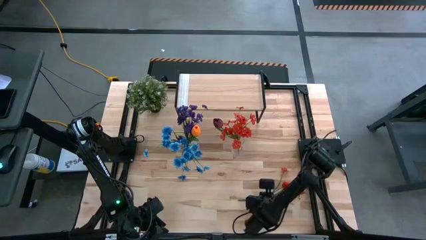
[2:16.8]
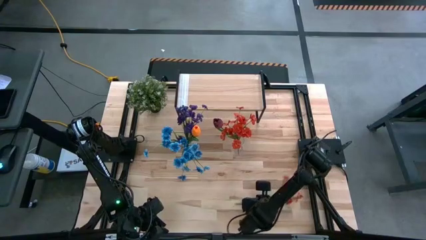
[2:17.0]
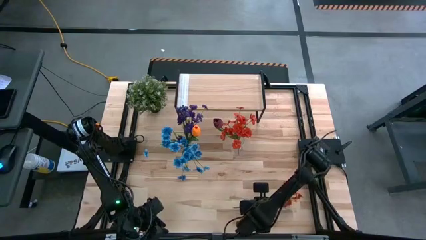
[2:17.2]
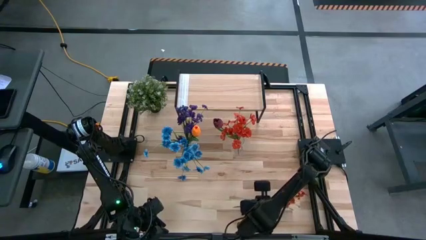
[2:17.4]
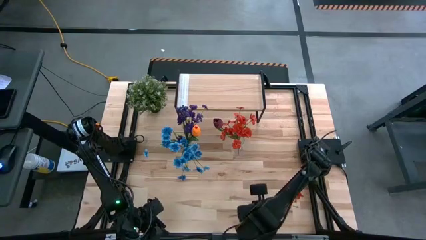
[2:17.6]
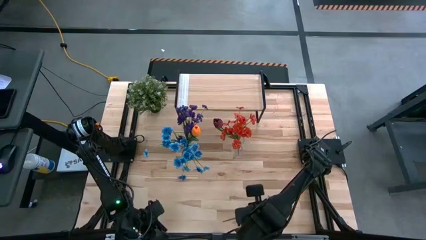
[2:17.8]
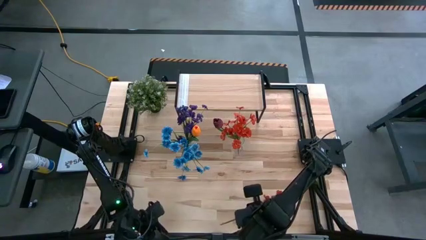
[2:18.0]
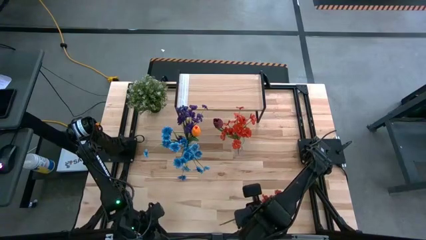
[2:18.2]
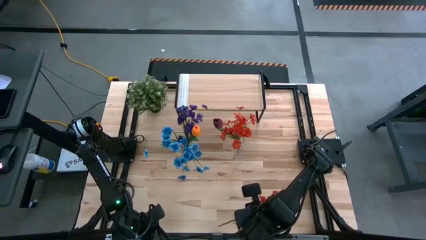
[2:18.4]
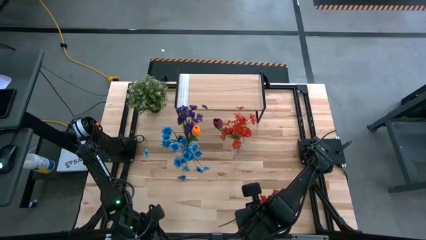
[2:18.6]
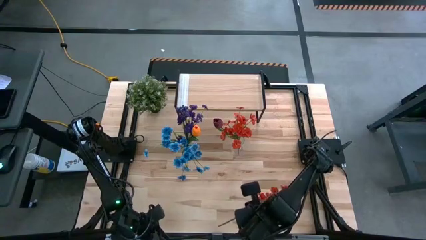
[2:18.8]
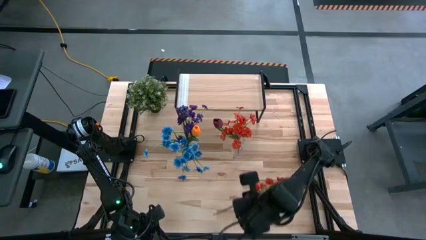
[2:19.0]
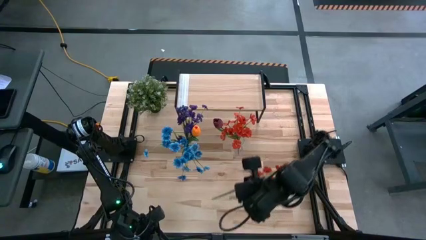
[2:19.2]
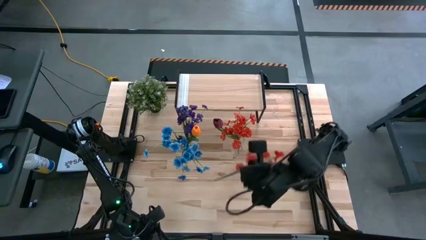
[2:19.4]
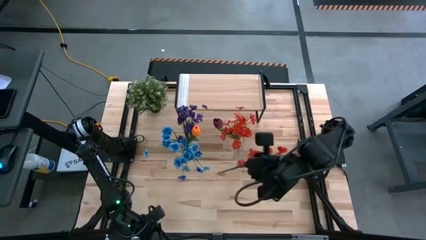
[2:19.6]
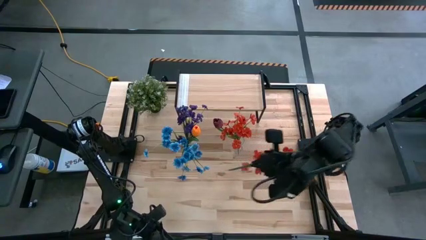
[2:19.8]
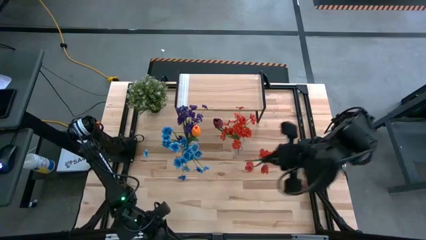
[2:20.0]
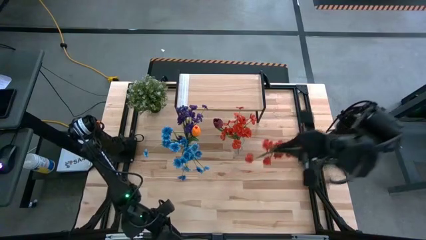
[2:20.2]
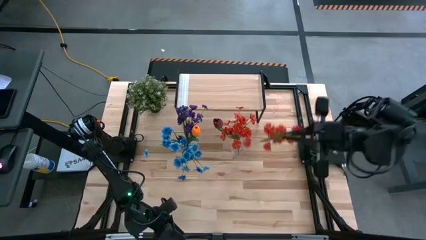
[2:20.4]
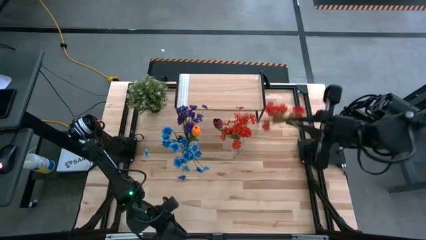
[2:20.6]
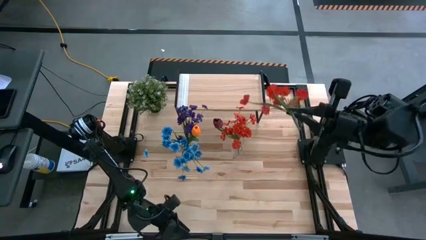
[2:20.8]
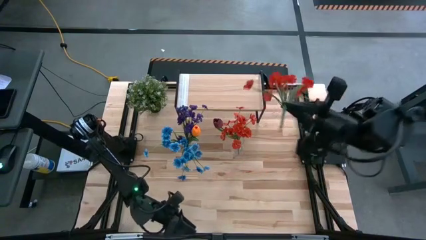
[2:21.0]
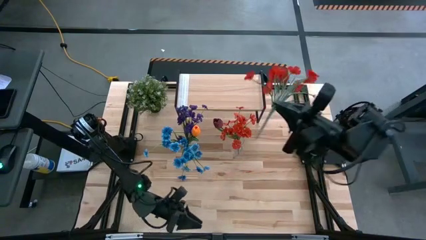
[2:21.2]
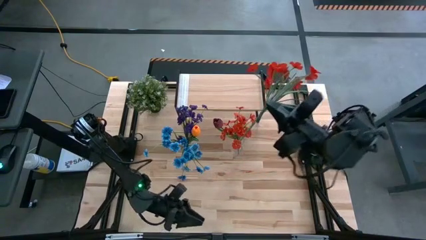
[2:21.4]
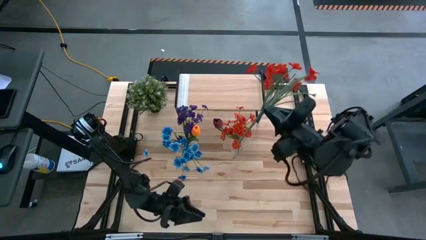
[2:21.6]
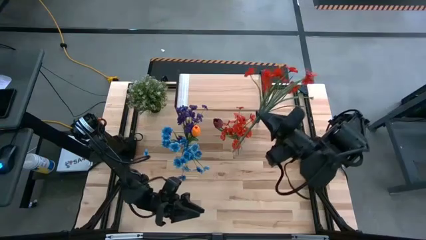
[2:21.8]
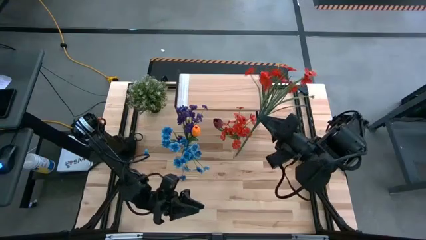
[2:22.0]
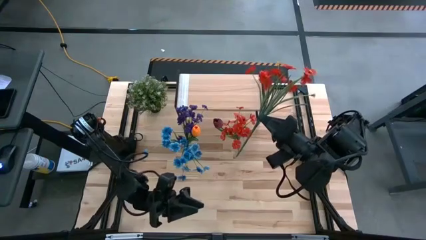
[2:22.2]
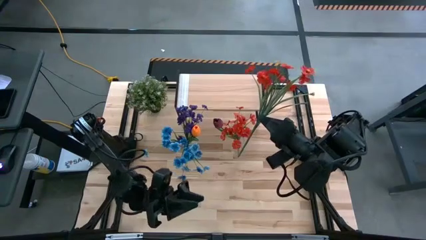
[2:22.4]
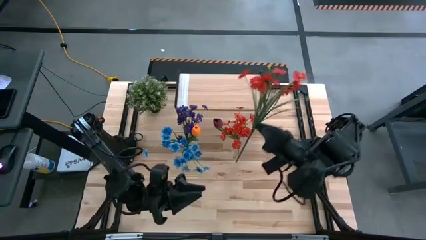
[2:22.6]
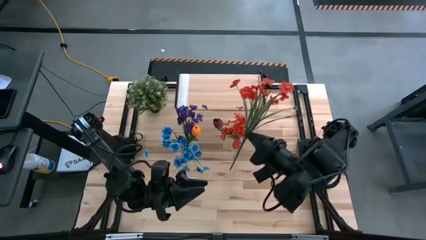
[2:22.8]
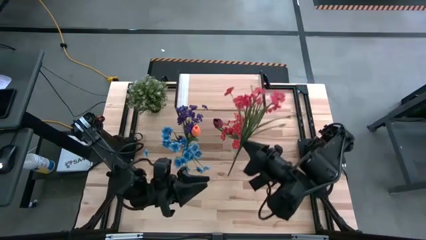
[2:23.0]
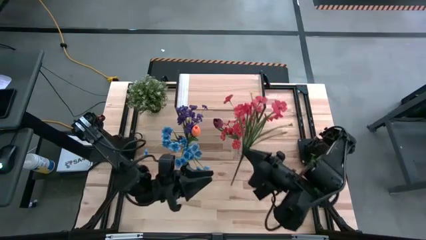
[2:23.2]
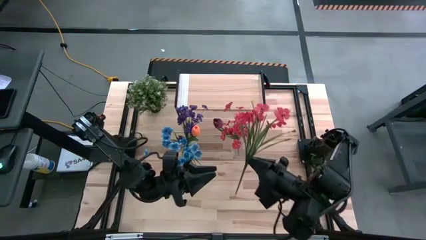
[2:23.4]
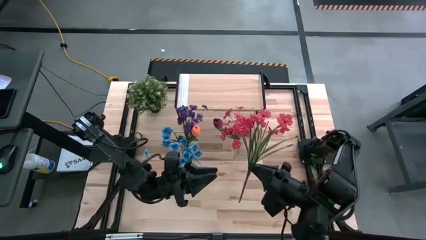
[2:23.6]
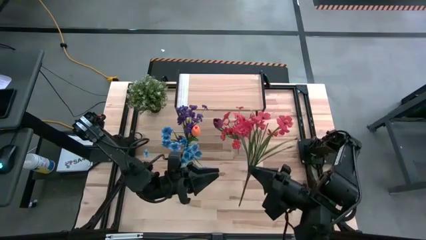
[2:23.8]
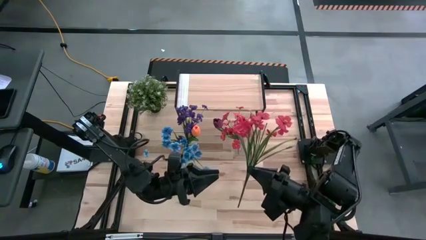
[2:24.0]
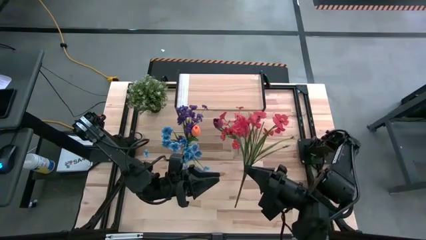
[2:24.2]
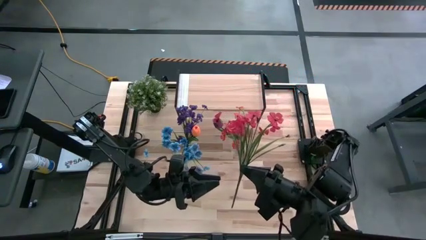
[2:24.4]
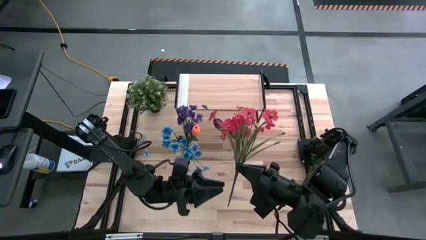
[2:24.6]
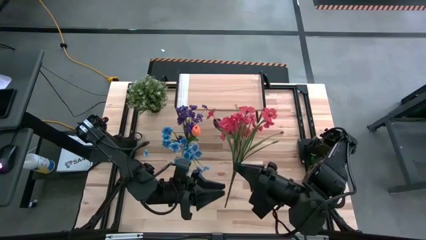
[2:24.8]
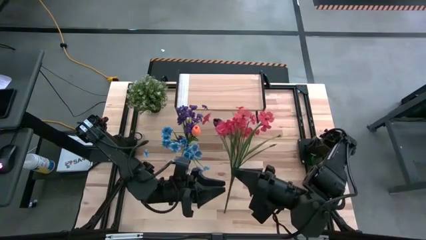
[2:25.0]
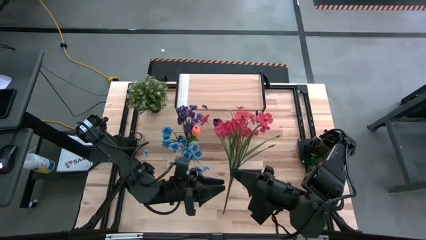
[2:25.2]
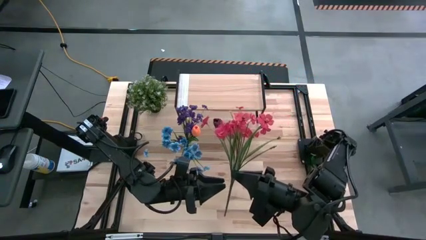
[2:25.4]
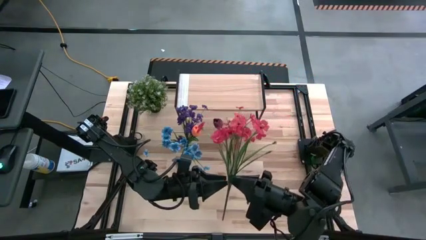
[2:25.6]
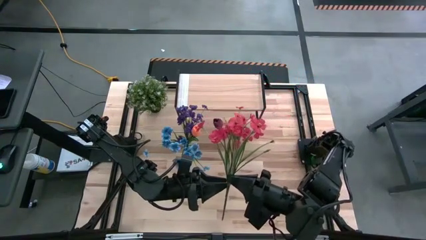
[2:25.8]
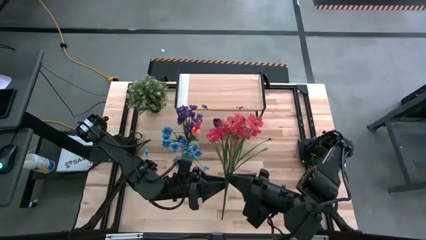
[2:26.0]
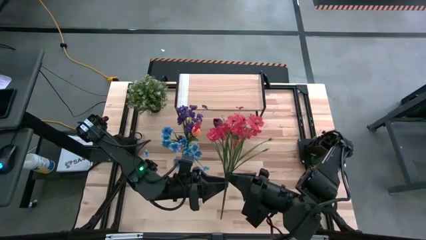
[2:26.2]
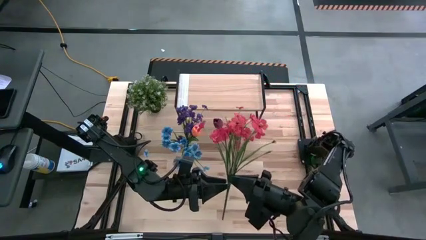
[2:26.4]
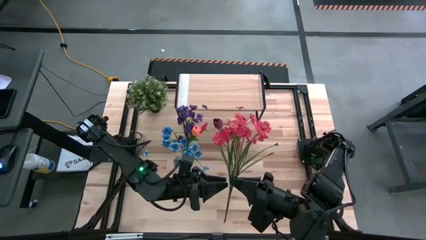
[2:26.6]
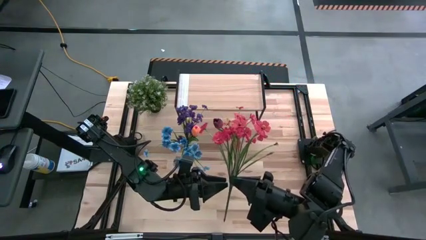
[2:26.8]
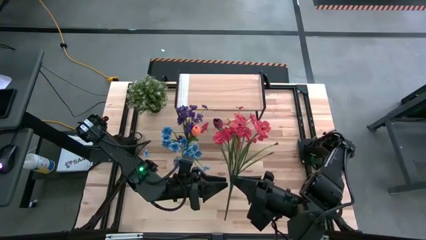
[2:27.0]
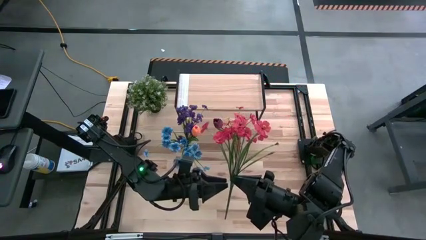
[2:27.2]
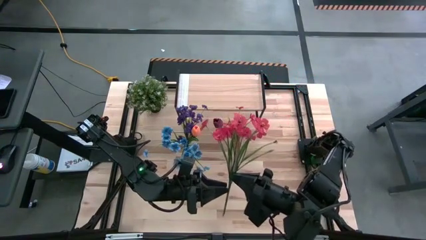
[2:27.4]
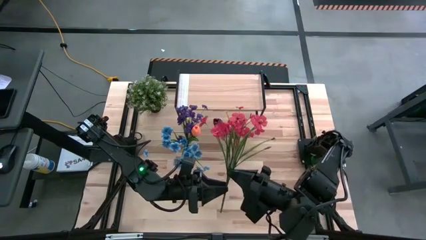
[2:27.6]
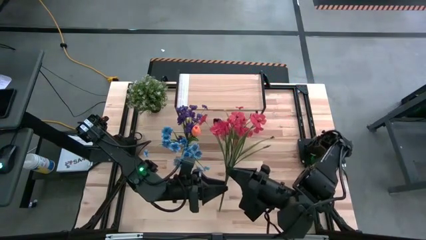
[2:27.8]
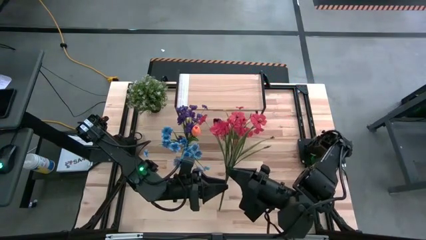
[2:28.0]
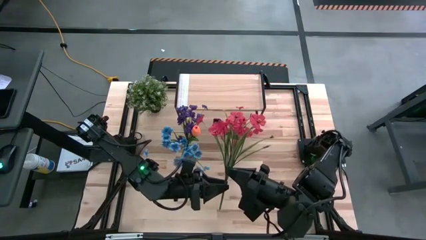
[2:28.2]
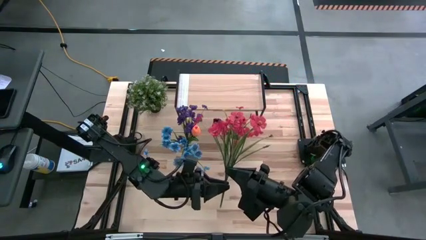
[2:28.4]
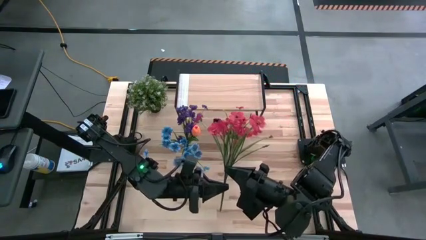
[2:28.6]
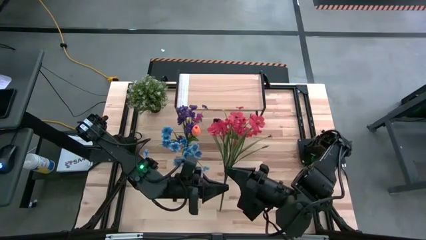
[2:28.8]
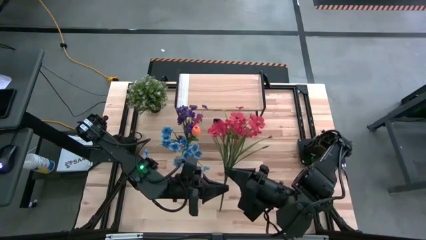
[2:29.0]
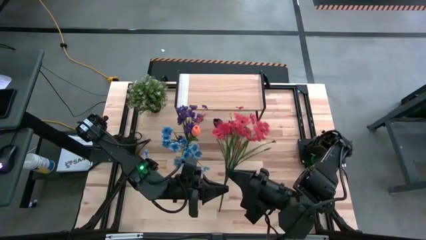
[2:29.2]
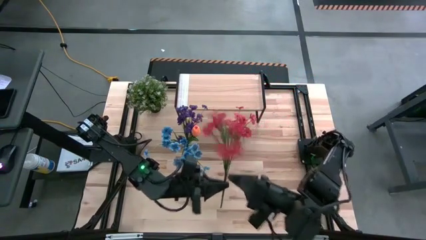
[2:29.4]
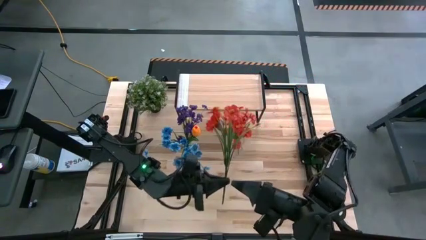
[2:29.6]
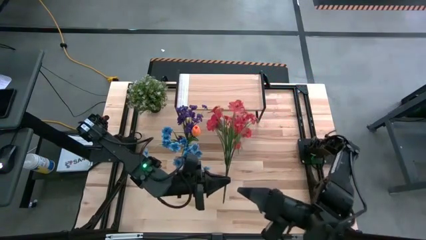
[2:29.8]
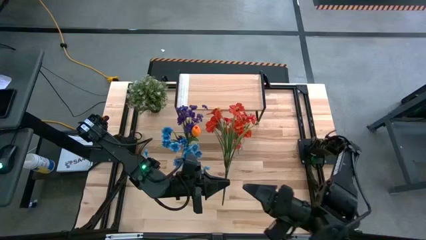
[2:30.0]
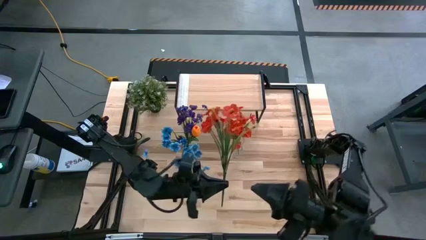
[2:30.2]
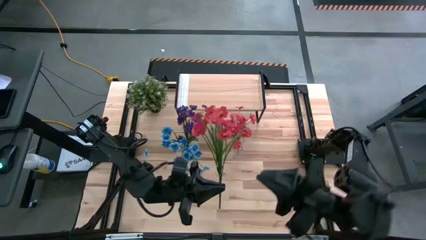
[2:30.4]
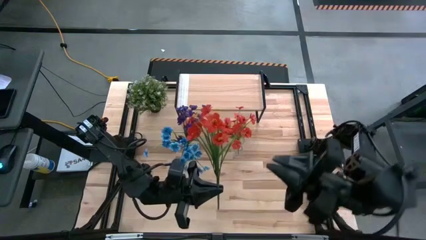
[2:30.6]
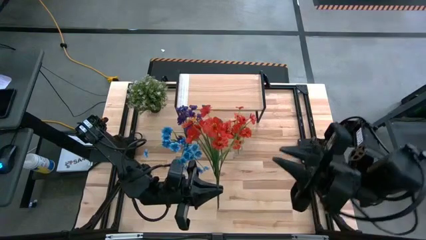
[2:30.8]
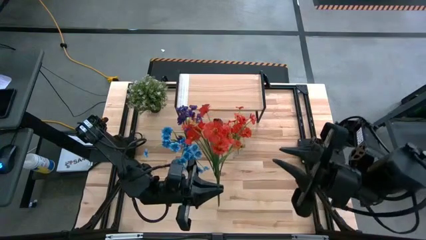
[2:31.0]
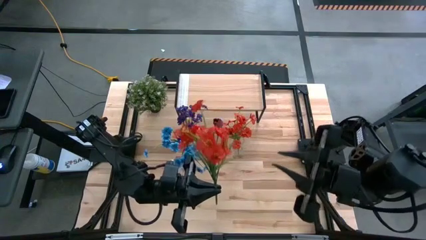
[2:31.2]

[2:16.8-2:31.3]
Task: Pick and place flowers into a vace then onto a shelf
Put the red flowers into the right transparent vase
